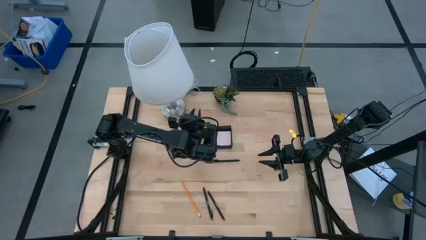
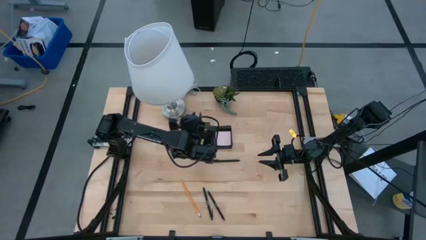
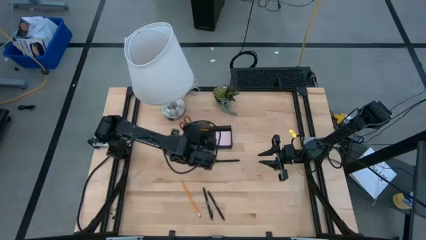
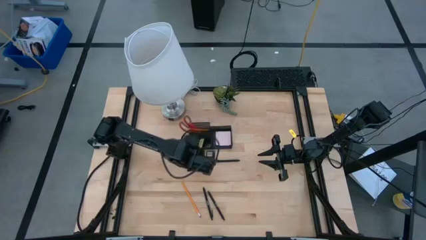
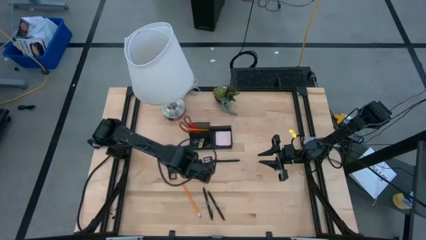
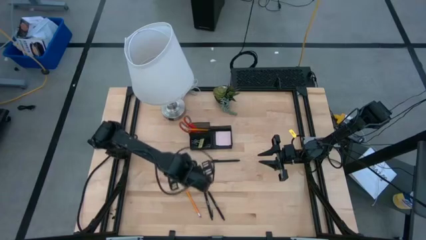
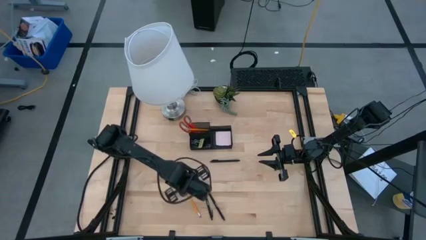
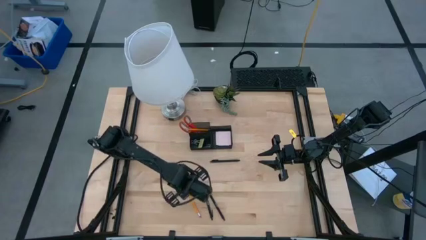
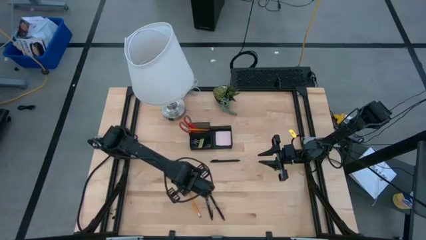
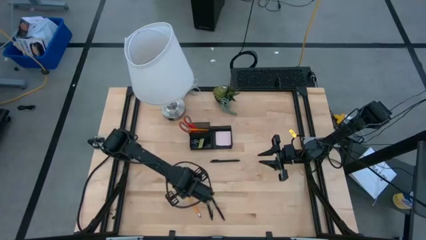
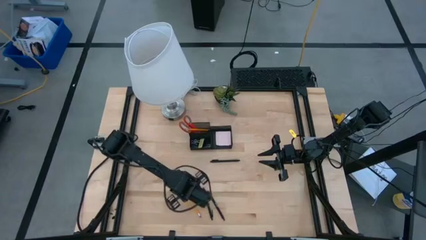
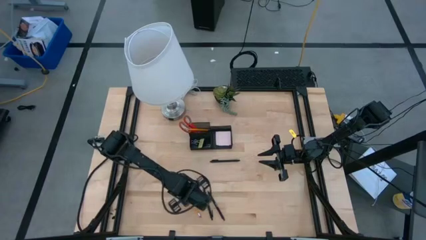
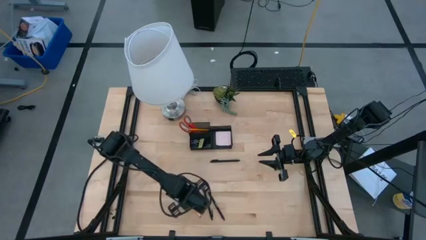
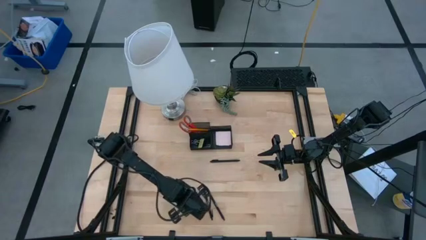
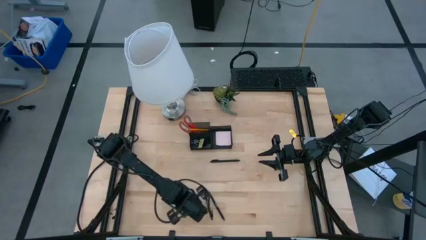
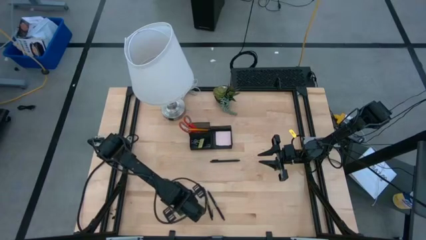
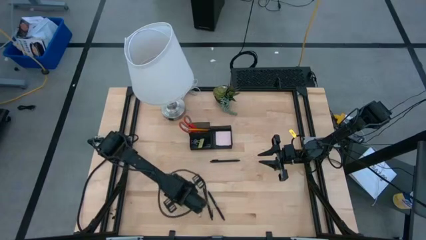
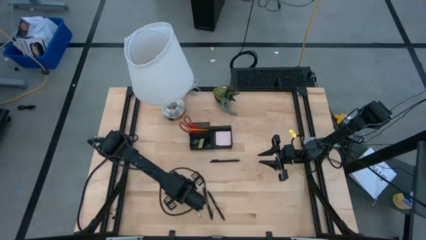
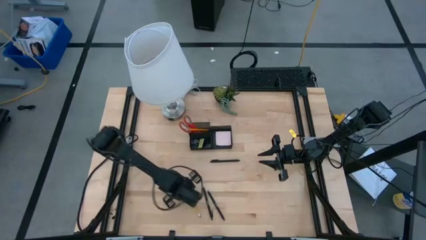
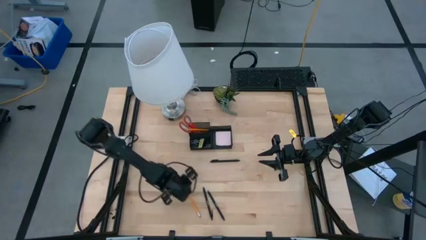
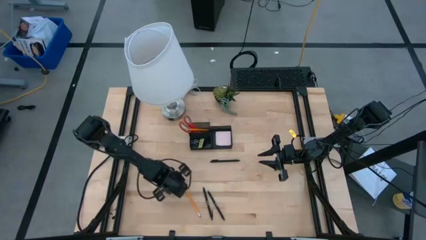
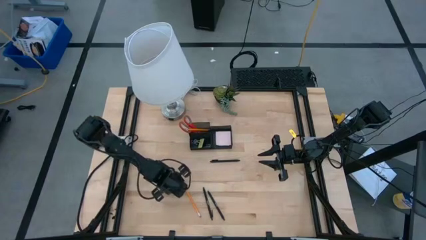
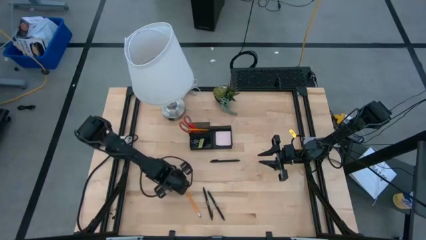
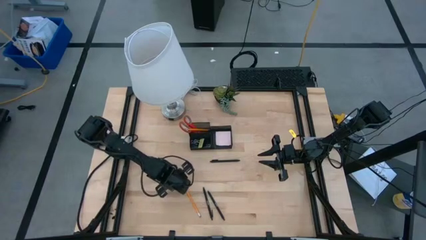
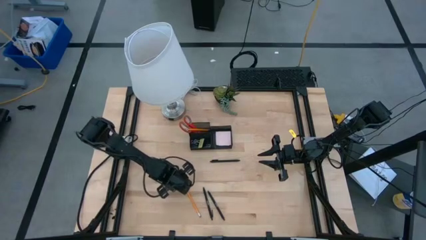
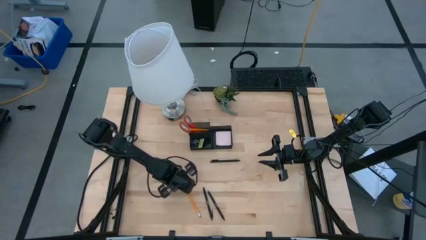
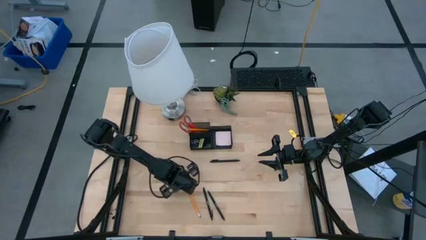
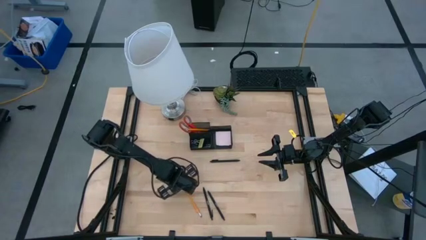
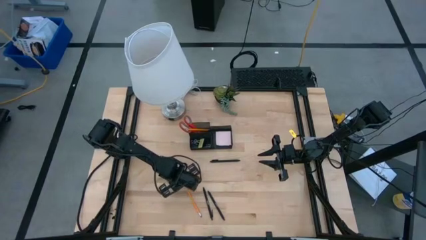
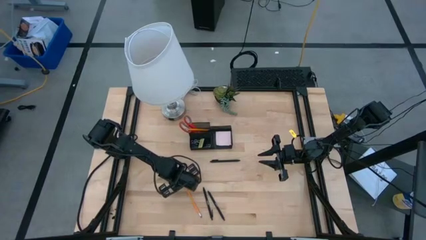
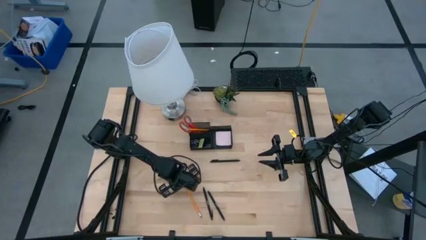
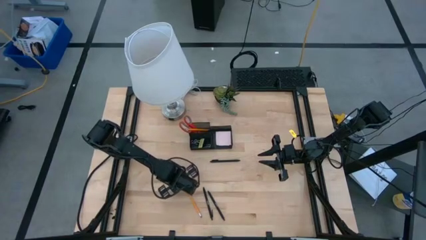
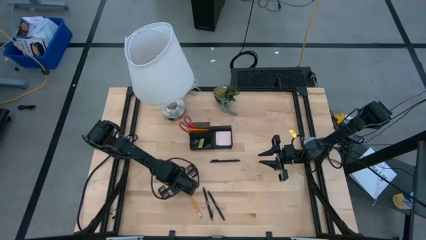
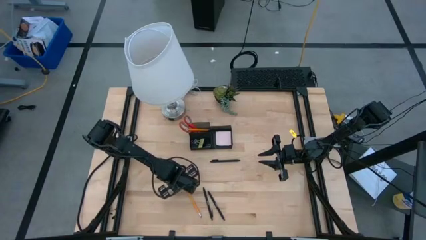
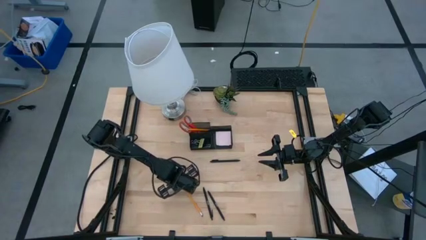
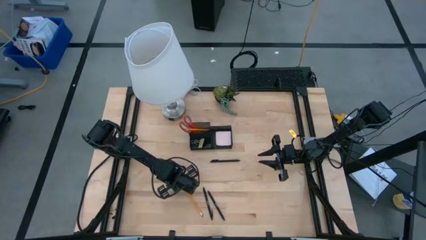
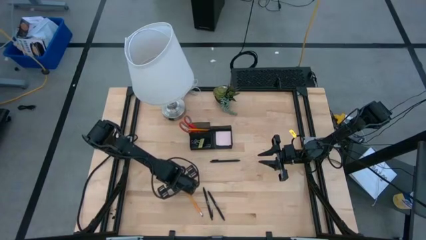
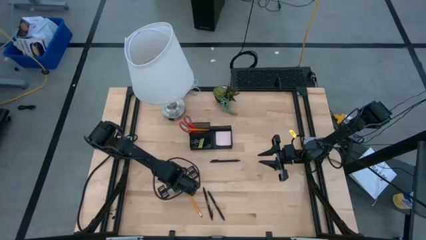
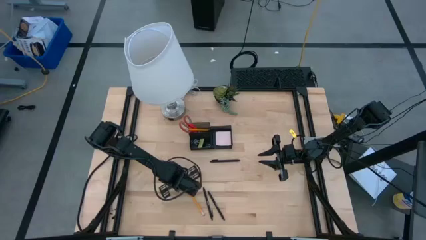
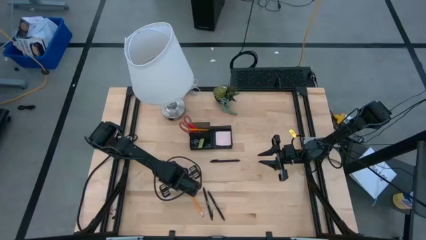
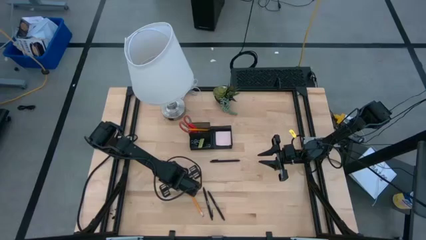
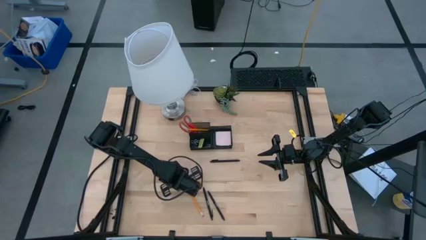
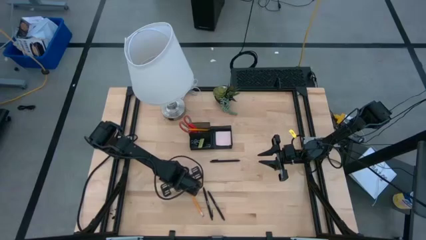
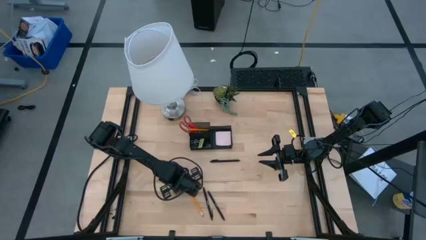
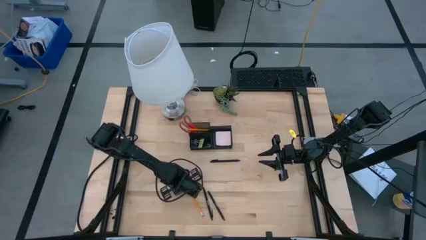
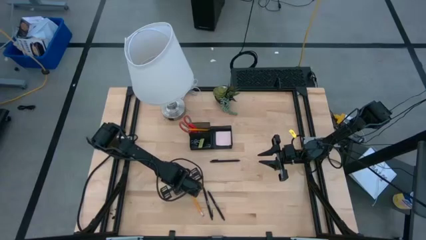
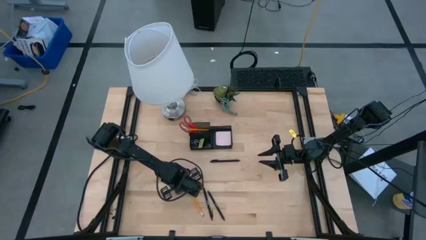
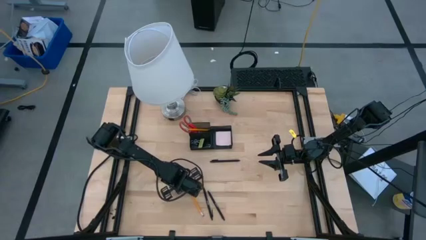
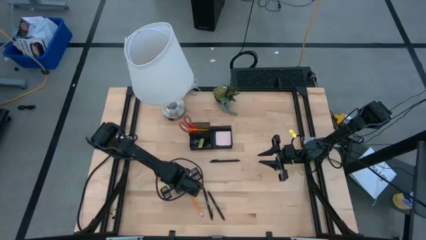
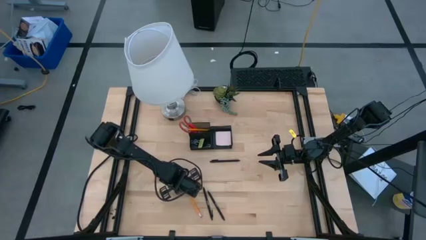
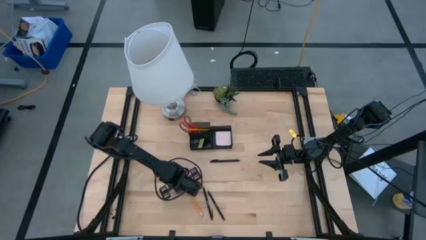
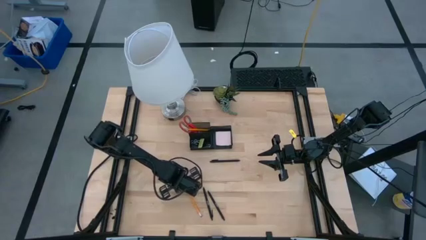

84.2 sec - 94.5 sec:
Task: Pick and place office supplies into organizer
Put the pencil into the black desk organizer
